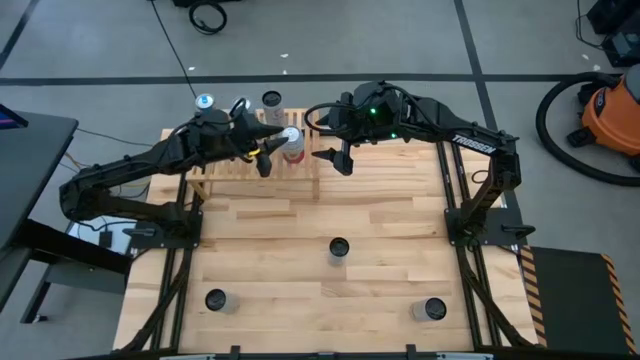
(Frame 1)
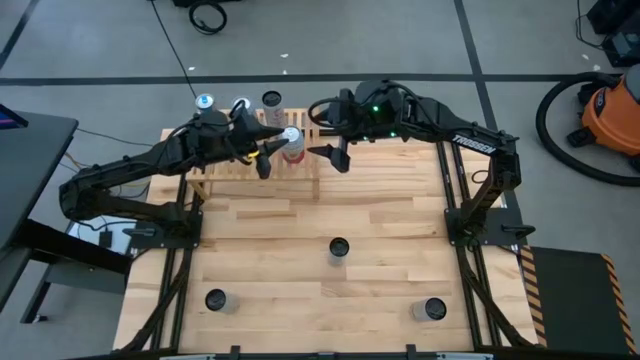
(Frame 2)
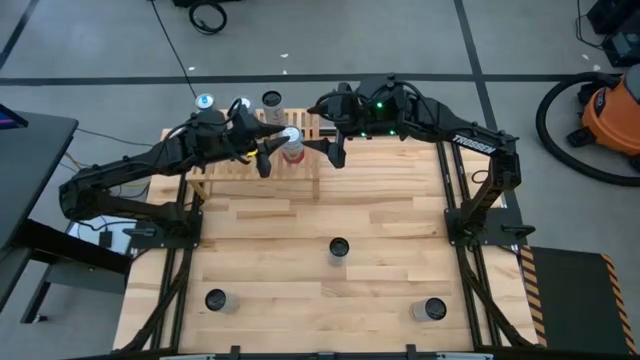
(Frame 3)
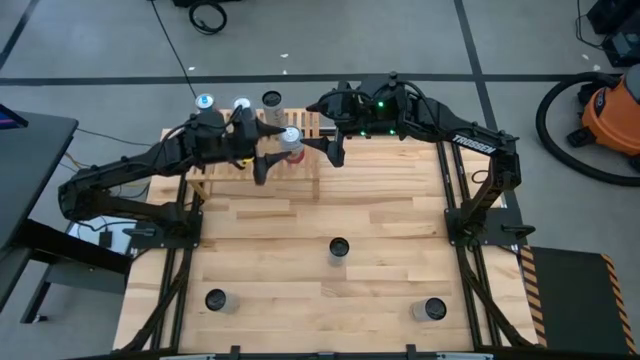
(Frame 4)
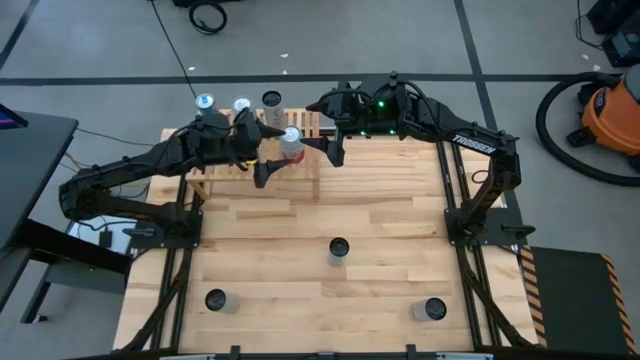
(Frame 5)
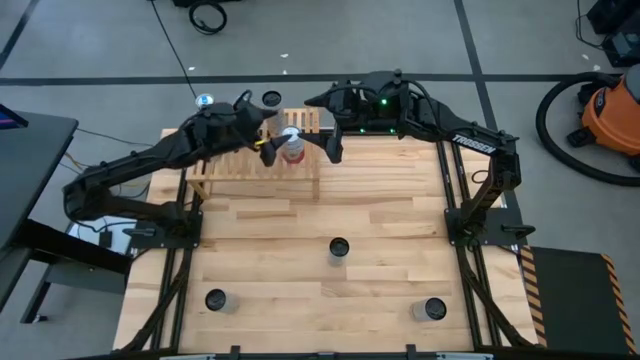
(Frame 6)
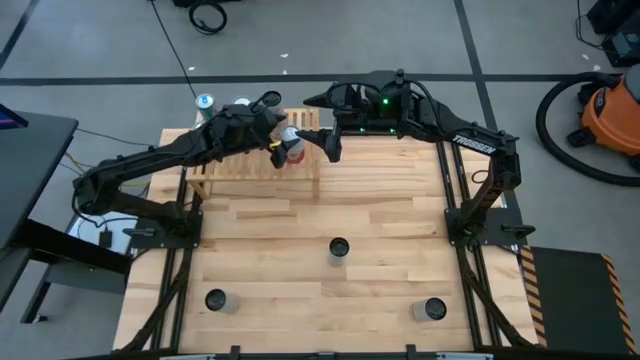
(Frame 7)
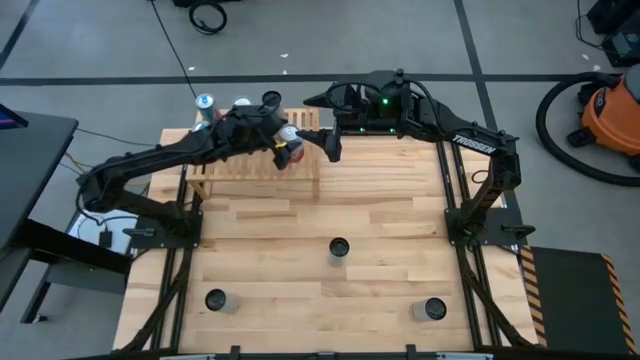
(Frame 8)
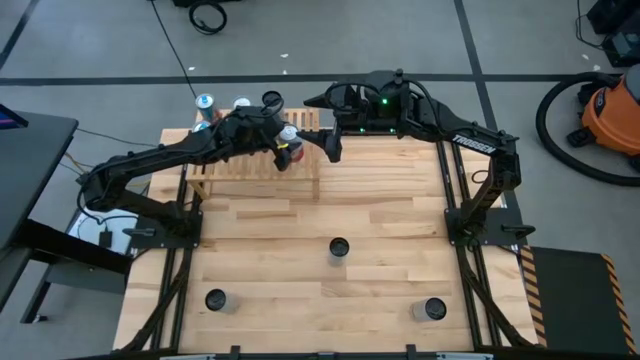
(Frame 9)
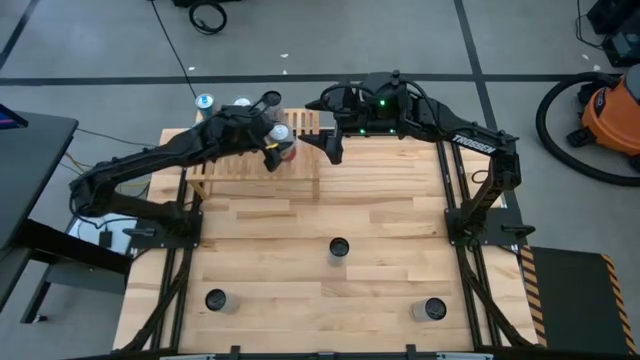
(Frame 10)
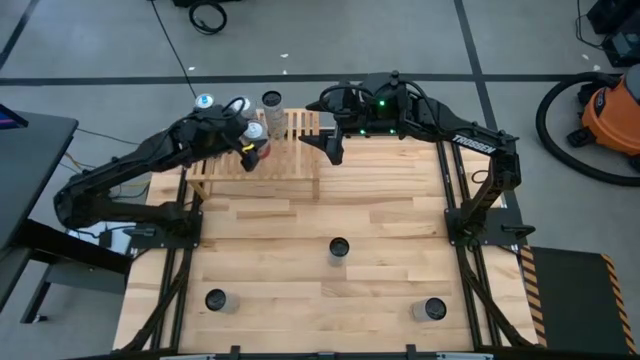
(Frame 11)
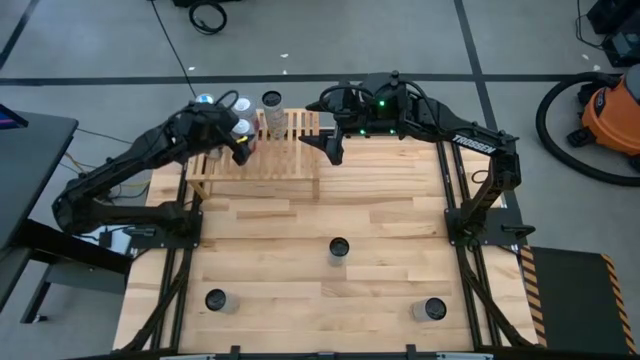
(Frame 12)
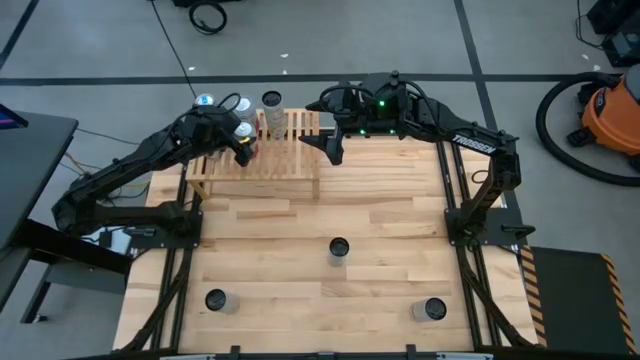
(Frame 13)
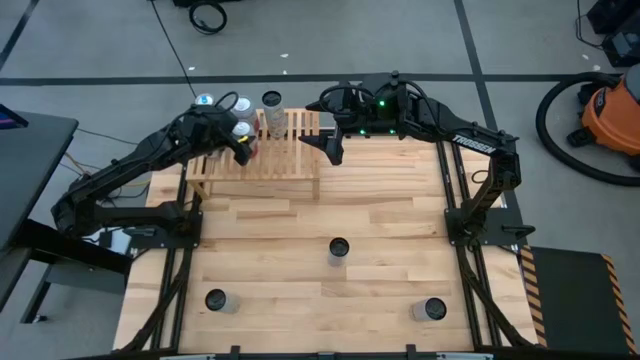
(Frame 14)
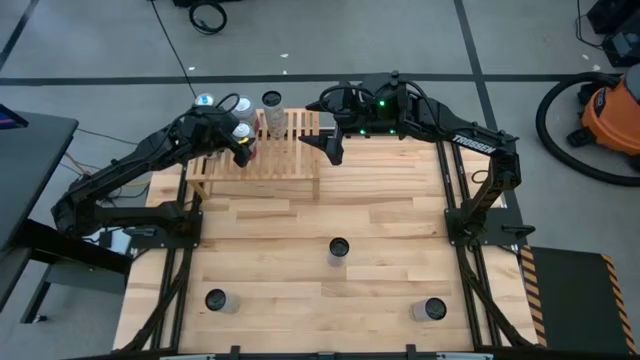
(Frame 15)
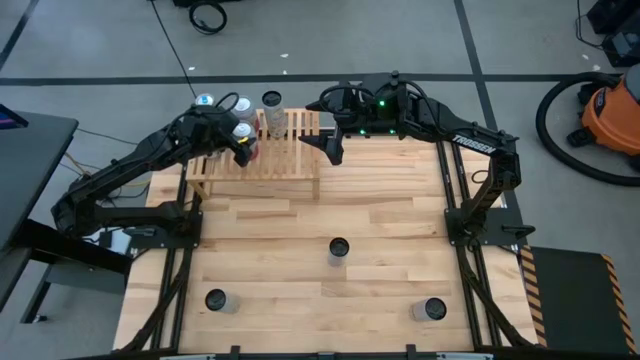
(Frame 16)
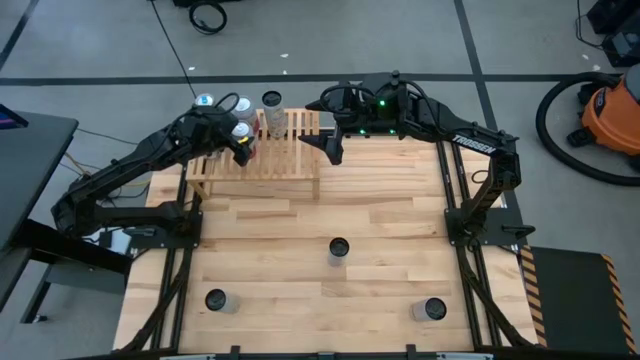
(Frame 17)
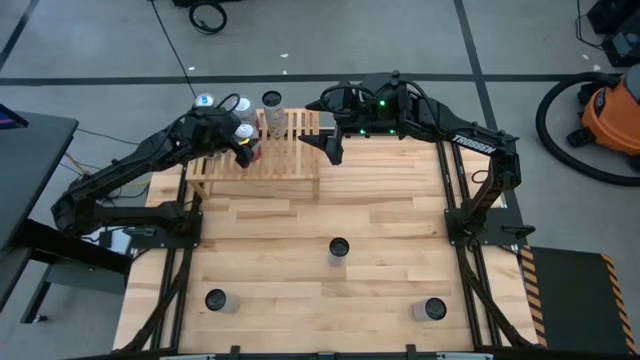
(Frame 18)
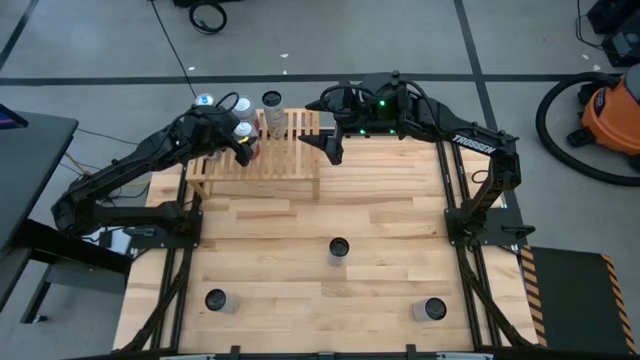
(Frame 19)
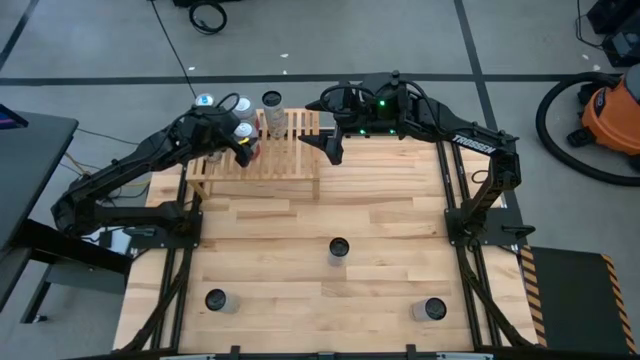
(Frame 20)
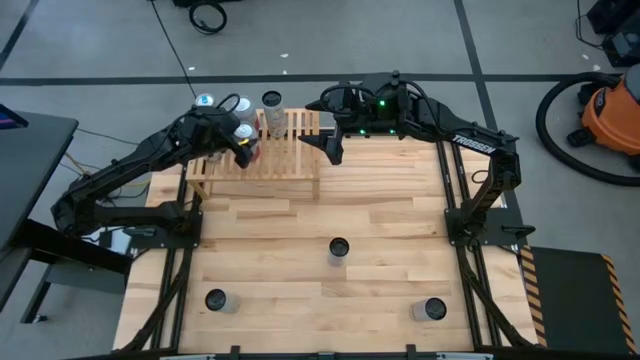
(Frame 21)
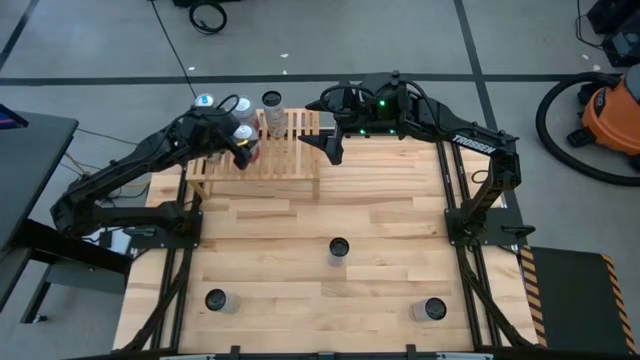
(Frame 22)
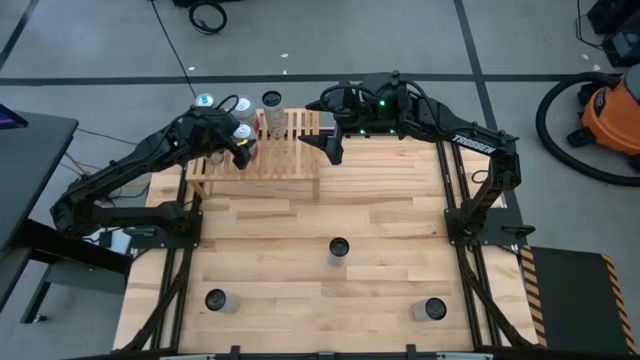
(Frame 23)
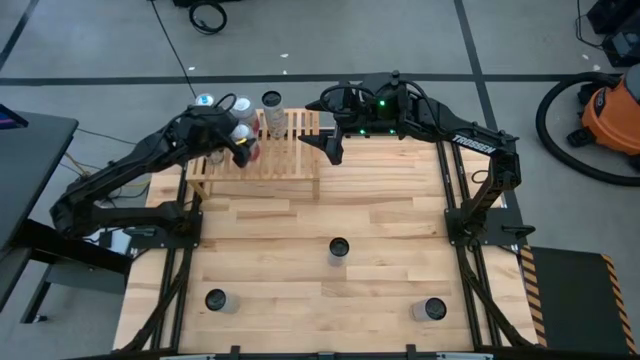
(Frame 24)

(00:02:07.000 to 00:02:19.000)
Task: Place canned beverage on shelf
Put the pink and white soda can on the shelf aligned with the other pink and white soda can

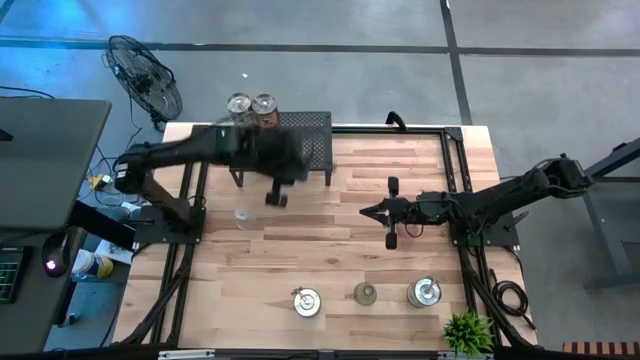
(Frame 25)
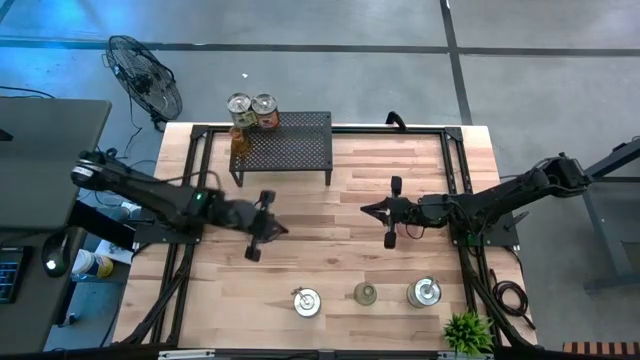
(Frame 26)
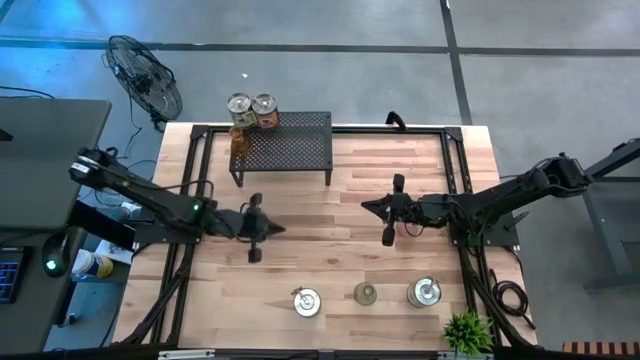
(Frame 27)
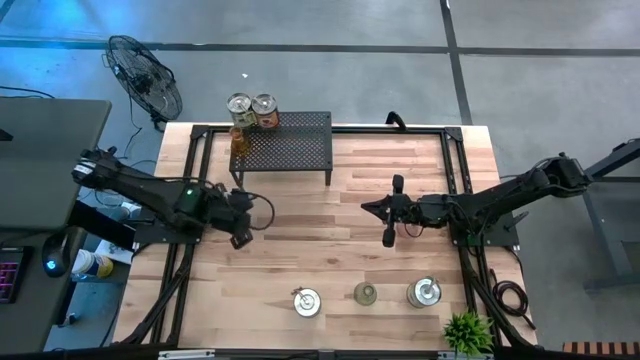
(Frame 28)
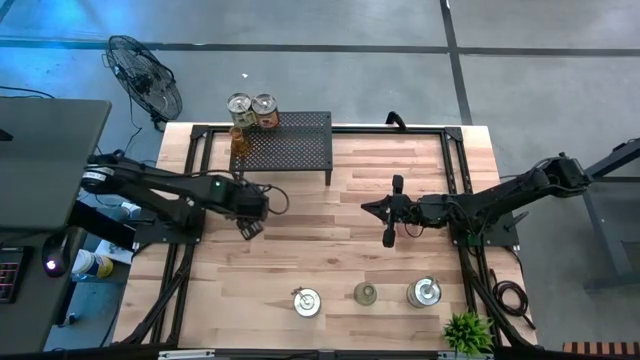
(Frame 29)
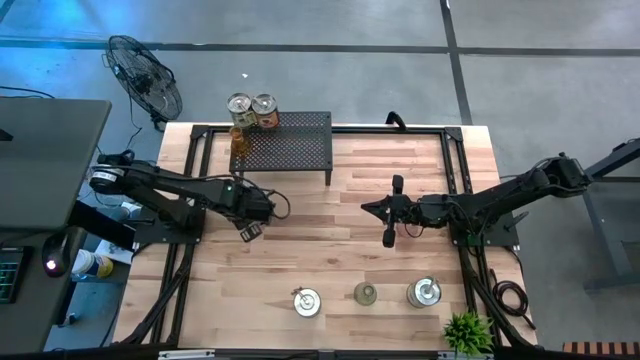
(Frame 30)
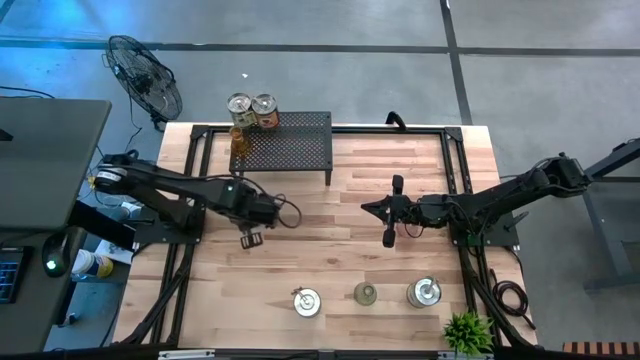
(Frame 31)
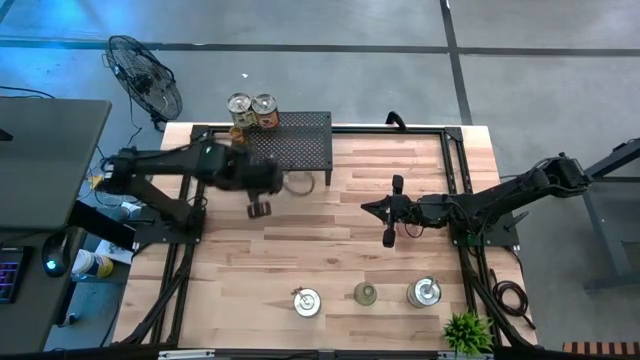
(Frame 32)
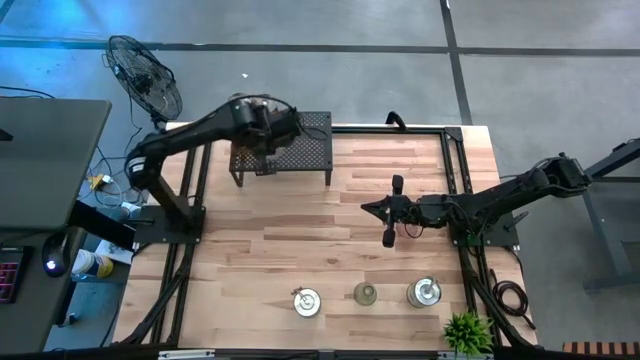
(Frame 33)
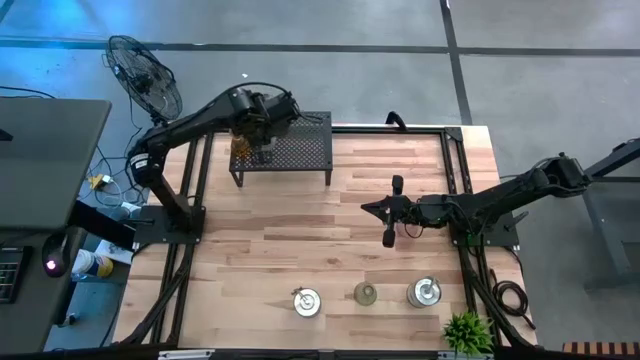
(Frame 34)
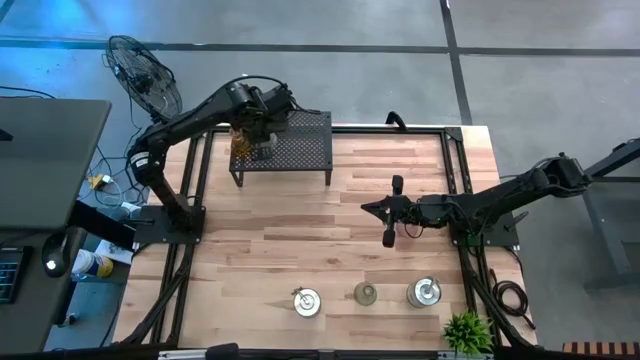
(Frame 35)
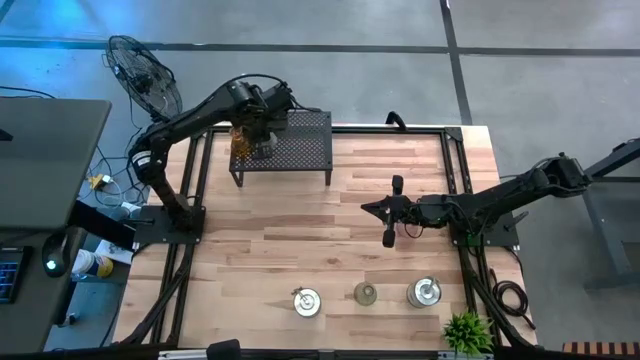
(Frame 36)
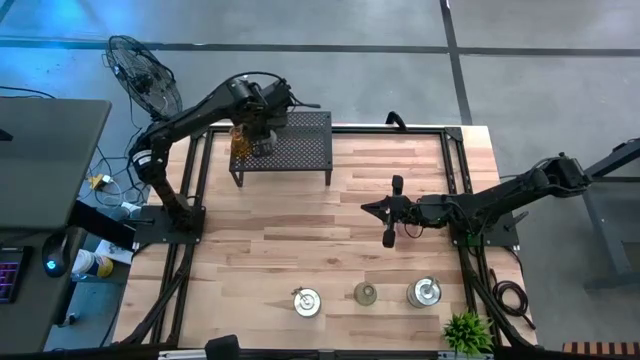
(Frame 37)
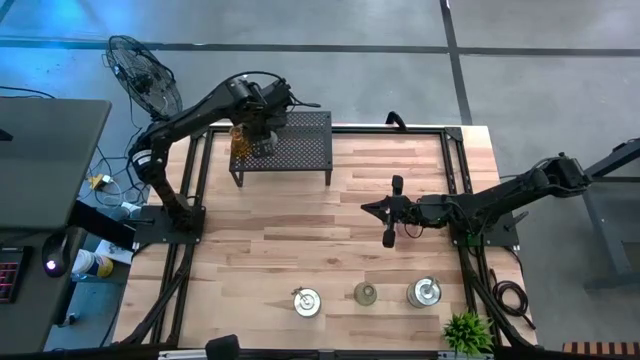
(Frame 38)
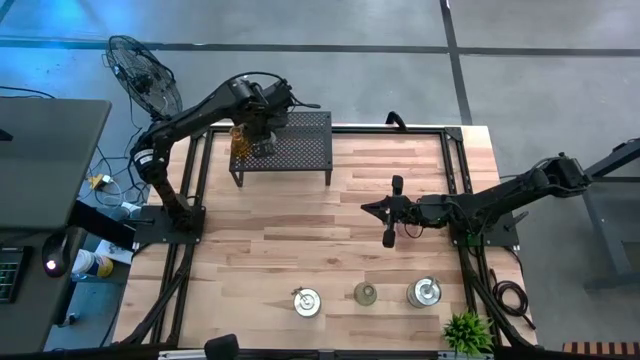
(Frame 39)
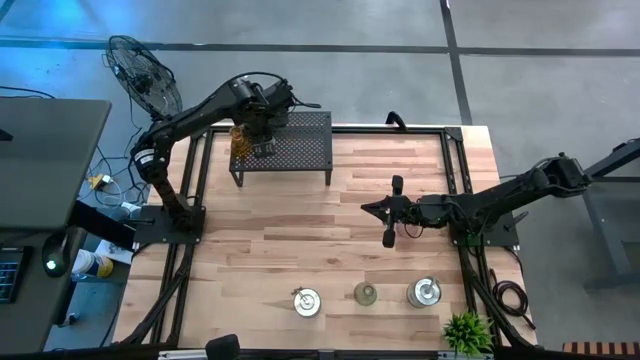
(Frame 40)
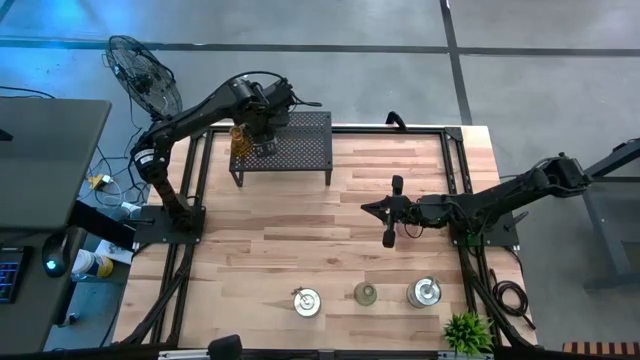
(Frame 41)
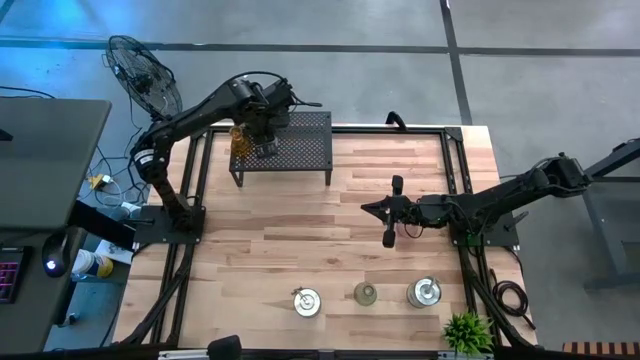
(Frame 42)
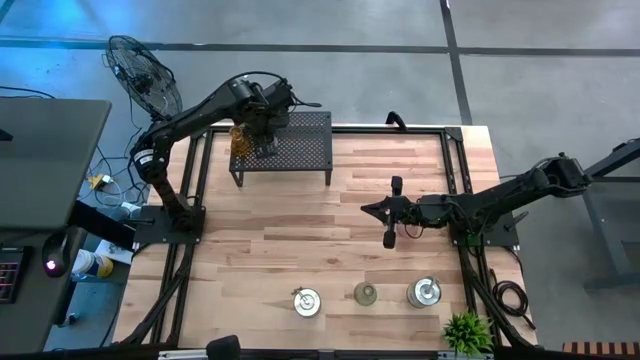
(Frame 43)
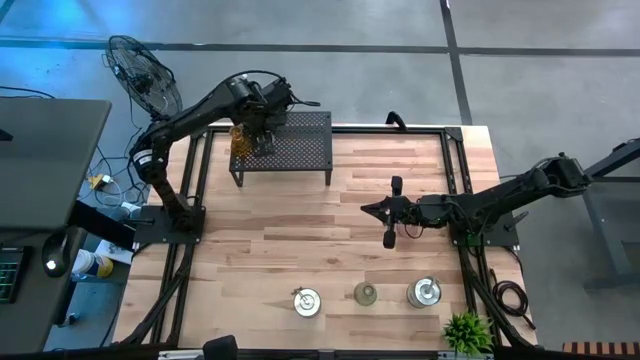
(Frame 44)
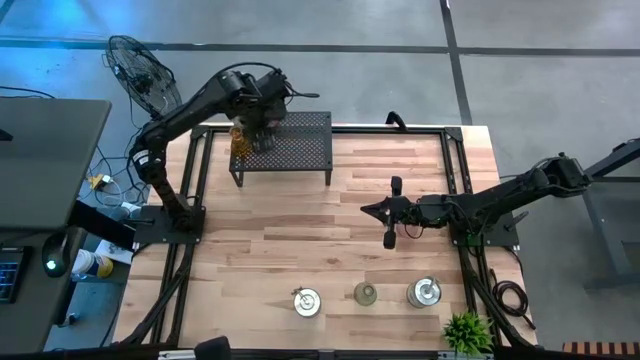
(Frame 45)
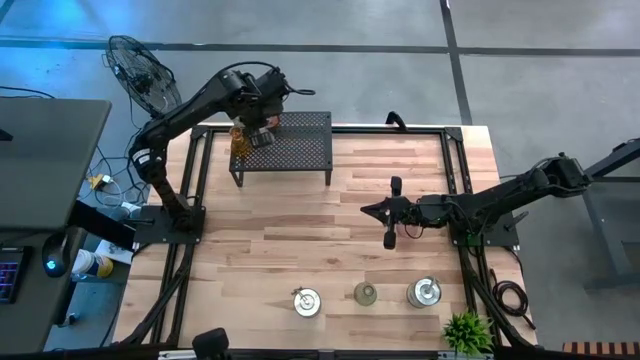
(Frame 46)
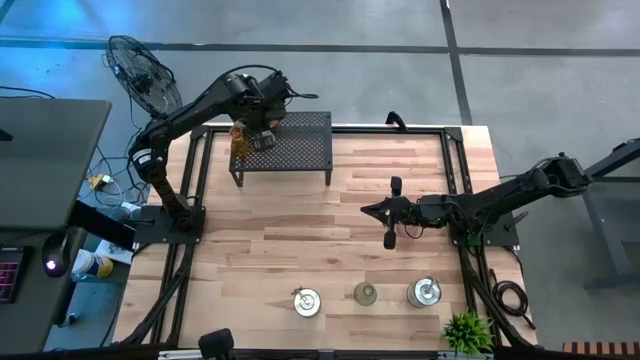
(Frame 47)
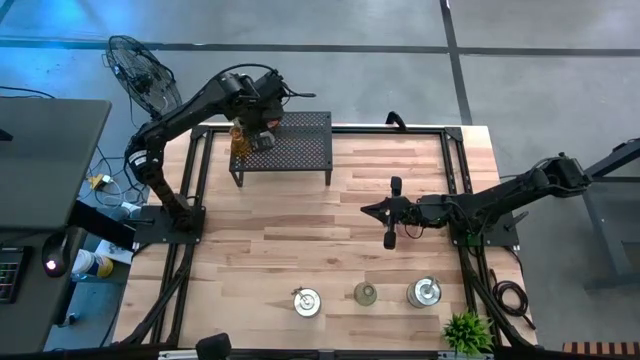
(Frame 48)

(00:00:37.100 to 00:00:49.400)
Task: Pick & Place candle stick holders
Put the transparent candle holder on the shelf aligned with the orange scented candle
